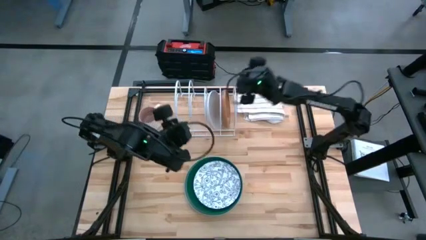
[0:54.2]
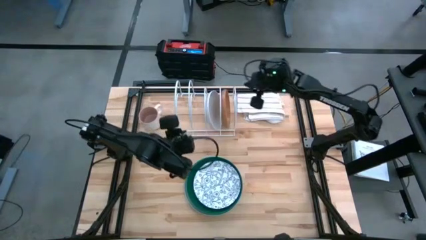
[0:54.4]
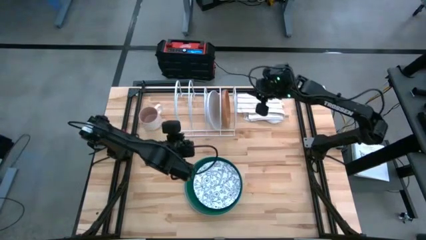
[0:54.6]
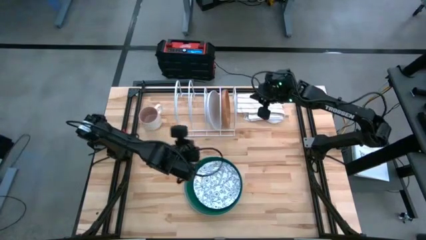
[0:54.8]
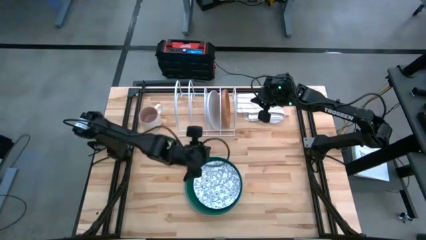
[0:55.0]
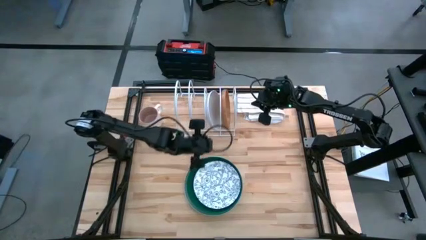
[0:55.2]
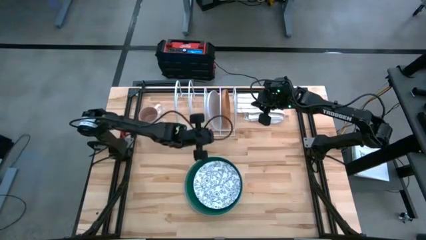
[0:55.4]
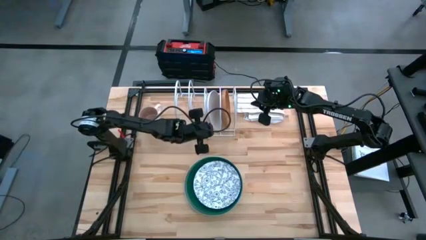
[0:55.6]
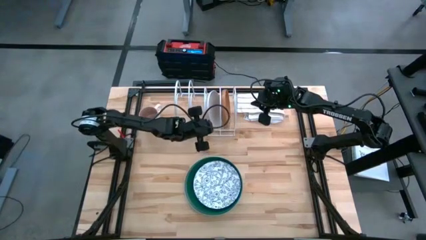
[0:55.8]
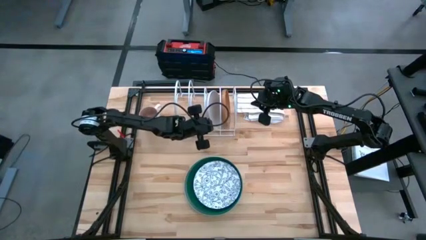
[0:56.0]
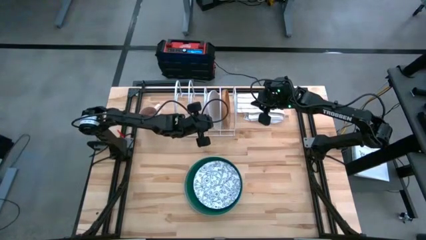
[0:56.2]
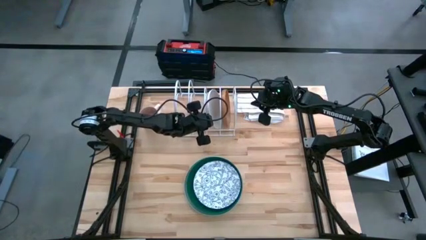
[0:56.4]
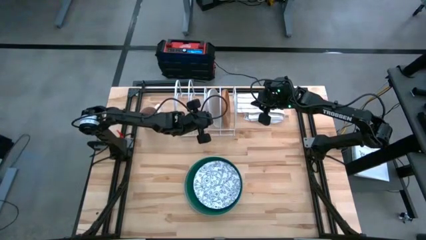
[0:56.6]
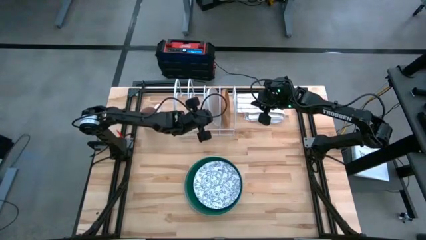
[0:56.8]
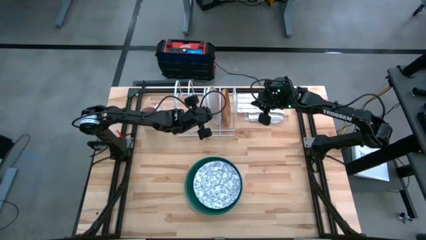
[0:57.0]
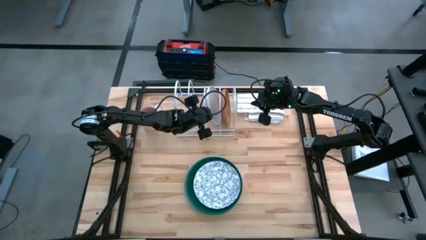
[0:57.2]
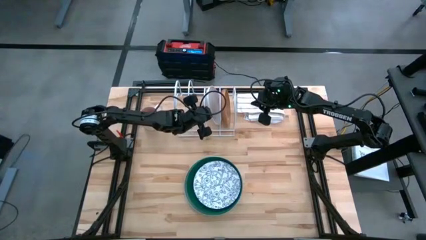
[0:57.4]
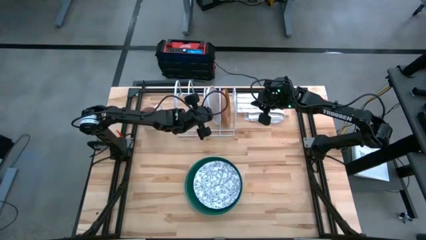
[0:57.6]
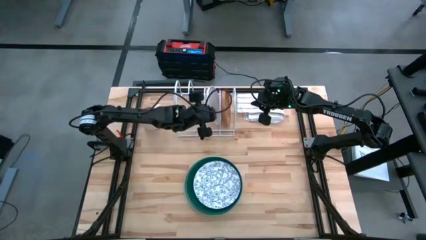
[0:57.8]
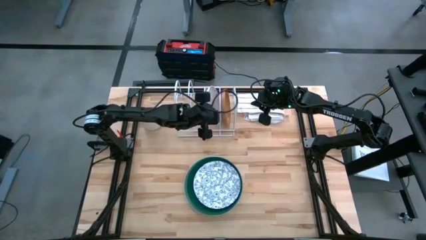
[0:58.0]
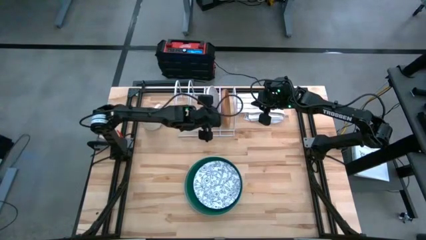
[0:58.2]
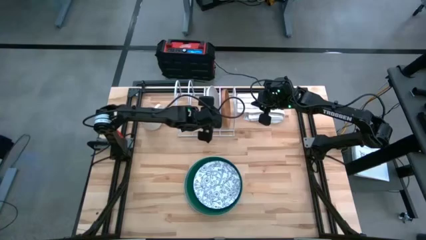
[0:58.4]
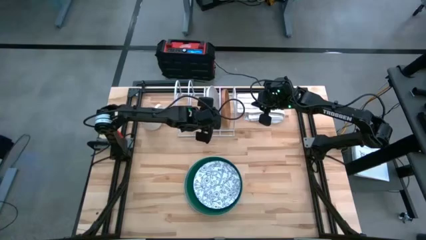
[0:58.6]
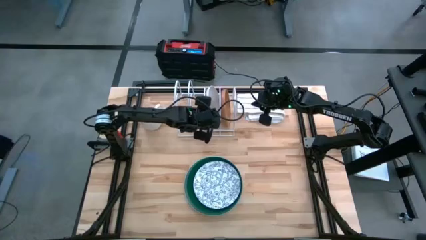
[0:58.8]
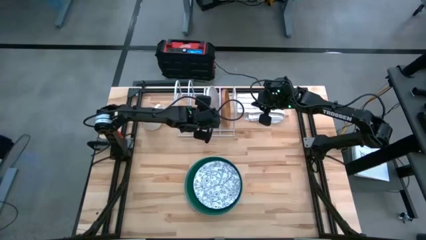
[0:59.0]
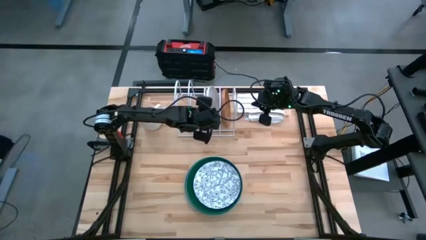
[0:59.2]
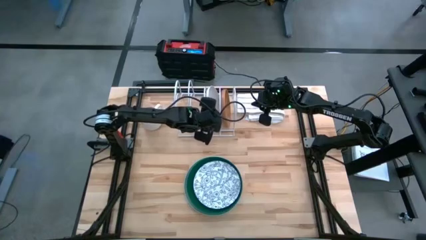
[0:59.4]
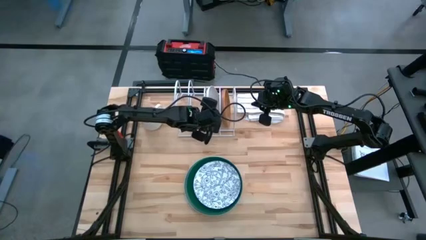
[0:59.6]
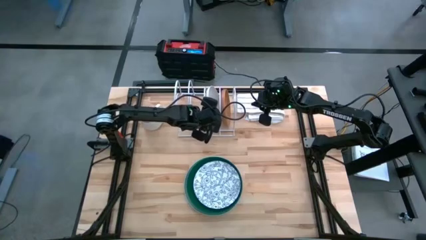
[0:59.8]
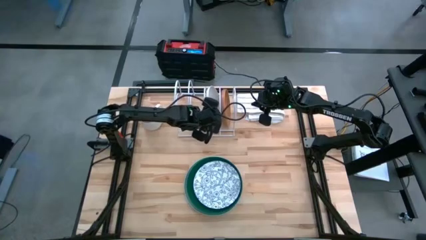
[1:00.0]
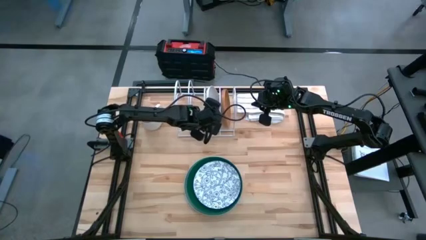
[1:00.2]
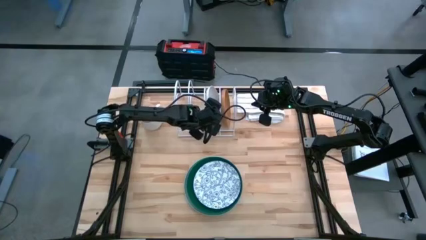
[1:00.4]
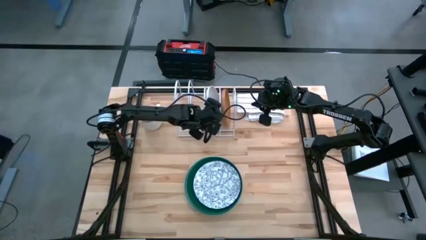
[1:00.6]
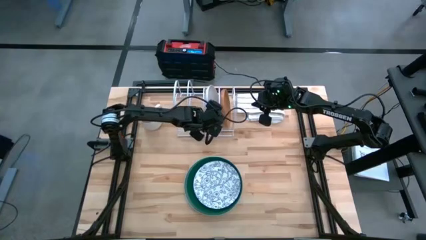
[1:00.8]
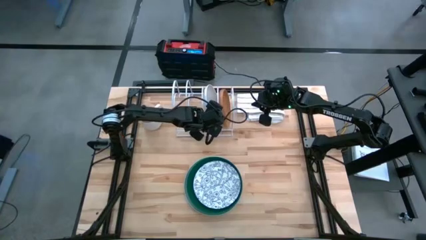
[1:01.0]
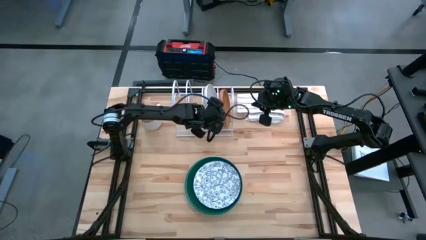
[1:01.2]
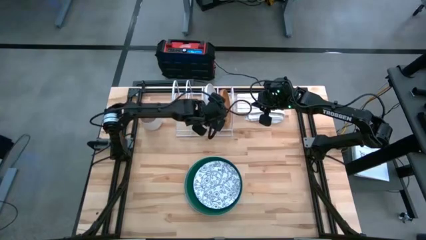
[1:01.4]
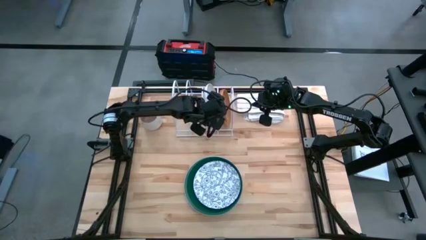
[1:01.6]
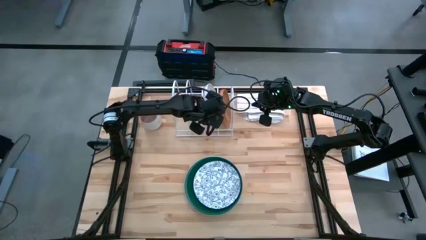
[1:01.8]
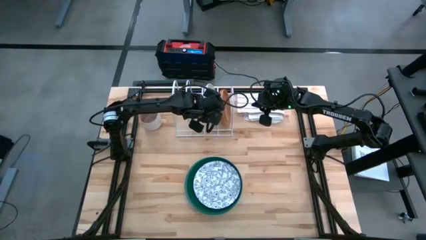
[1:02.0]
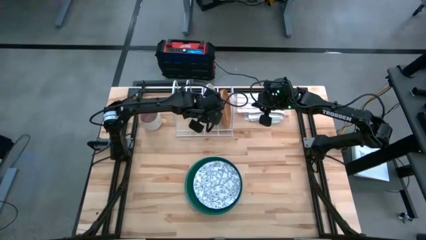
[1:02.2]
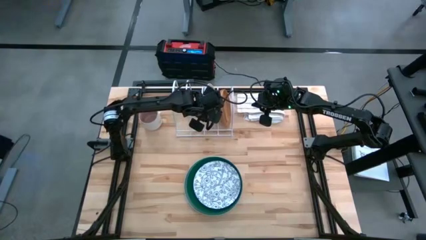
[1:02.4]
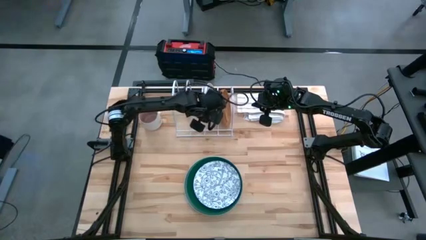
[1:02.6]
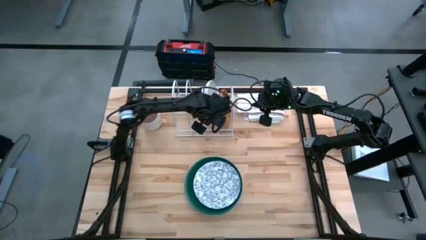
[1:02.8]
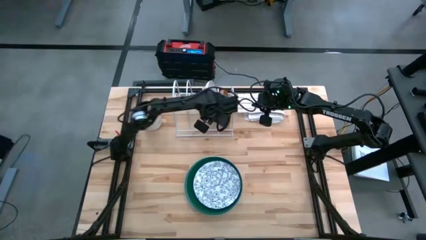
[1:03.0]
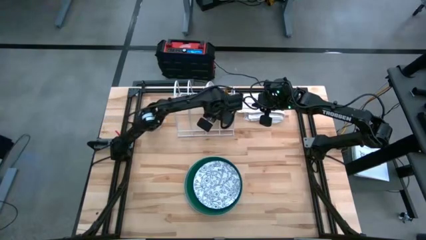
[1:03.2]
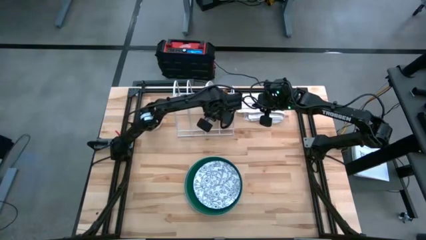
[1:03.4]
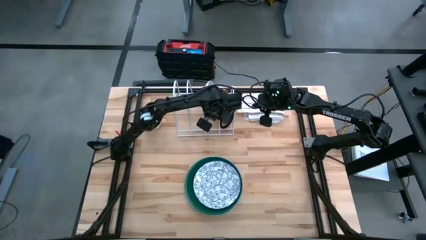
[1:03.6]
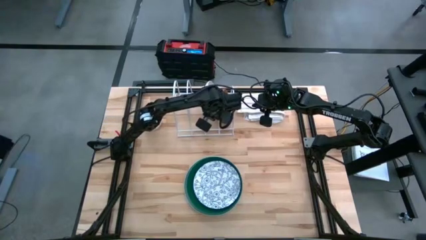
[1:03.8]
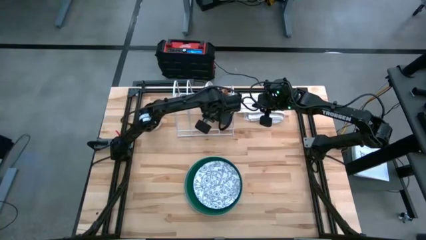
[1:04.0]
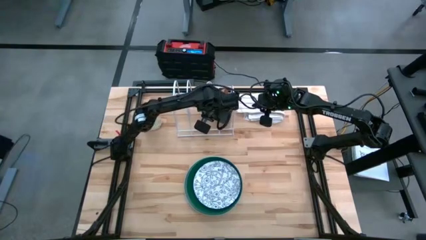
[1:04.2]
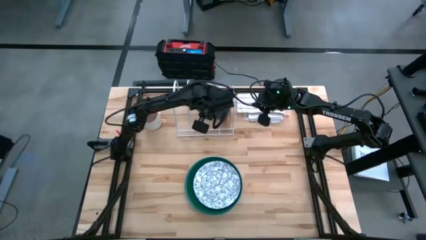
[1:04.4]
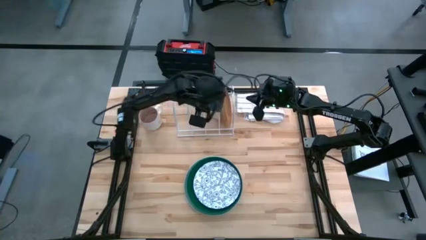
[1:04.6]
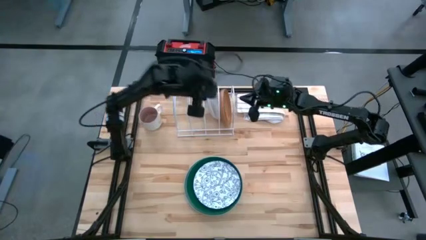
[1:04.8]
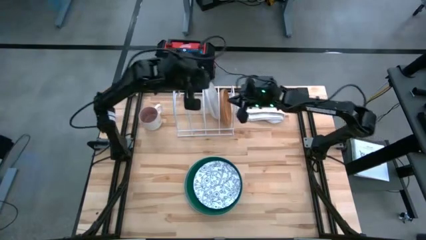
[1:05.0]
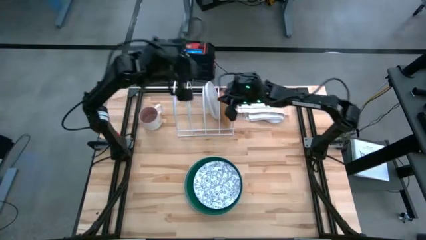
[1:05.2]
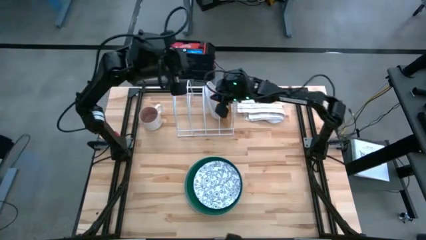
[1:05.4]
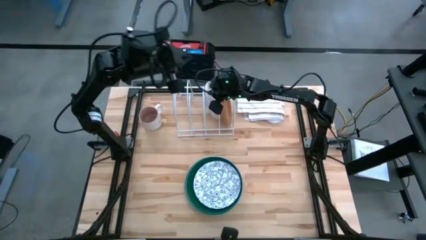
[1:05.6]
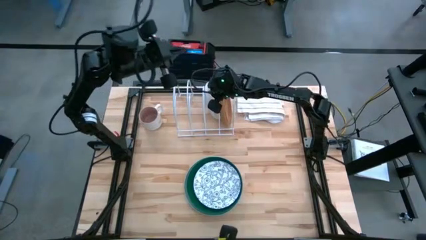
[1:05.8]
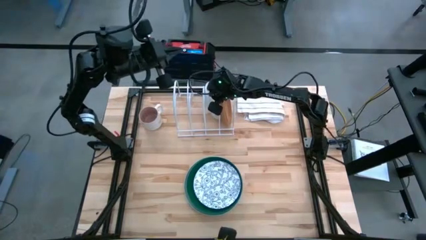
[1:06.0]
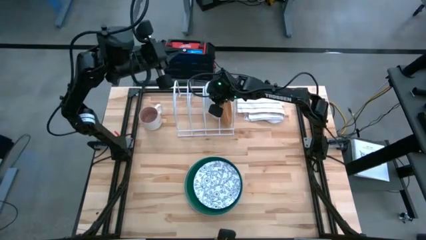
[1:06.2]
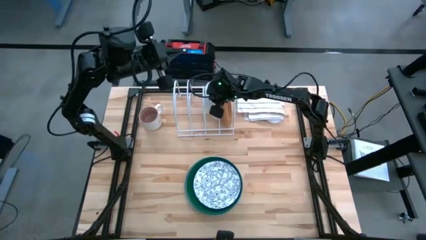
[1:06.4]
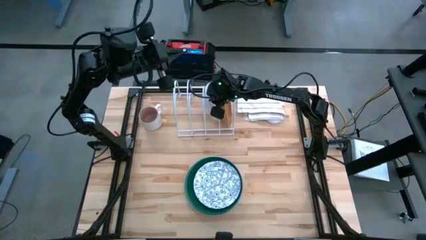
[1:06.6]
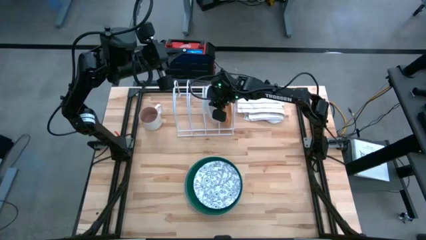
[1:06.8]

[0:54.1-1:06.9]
Task: Sort dishes
Put the white plate into the dishwasher rack
